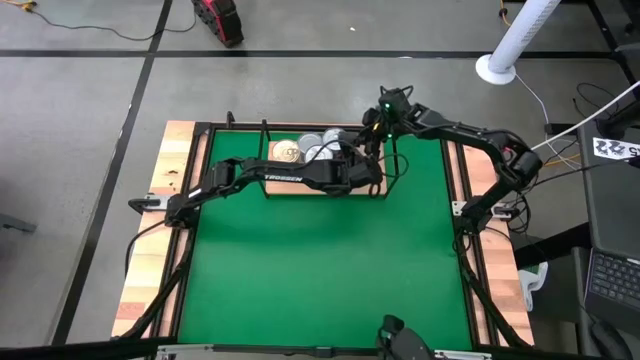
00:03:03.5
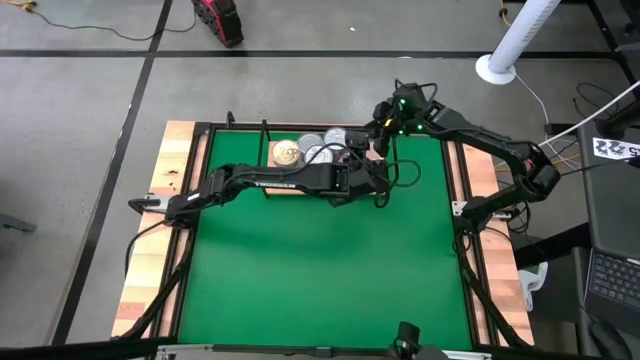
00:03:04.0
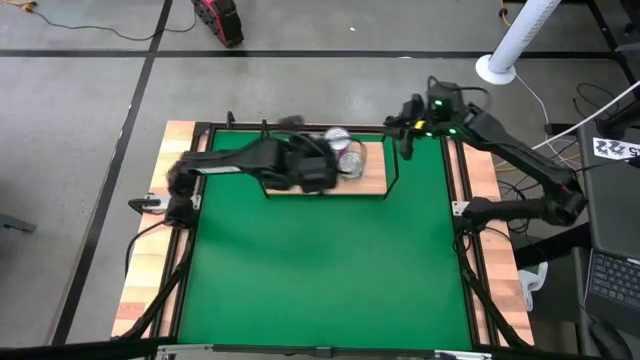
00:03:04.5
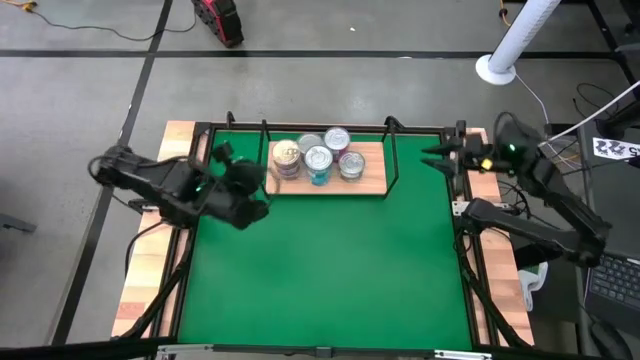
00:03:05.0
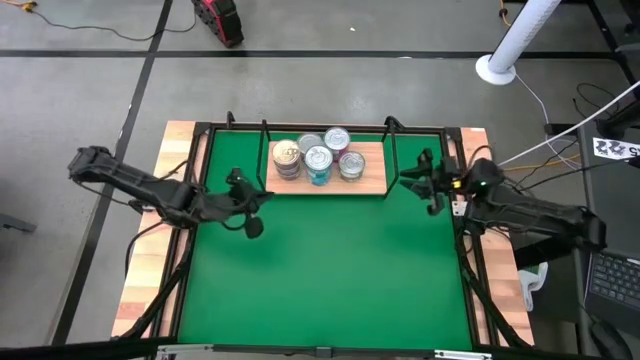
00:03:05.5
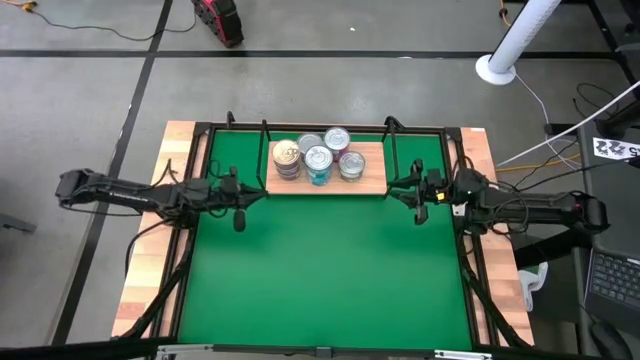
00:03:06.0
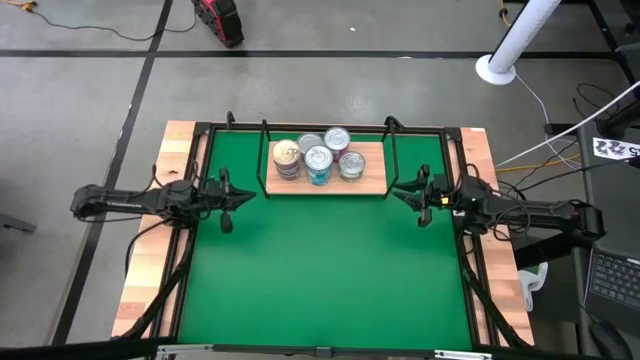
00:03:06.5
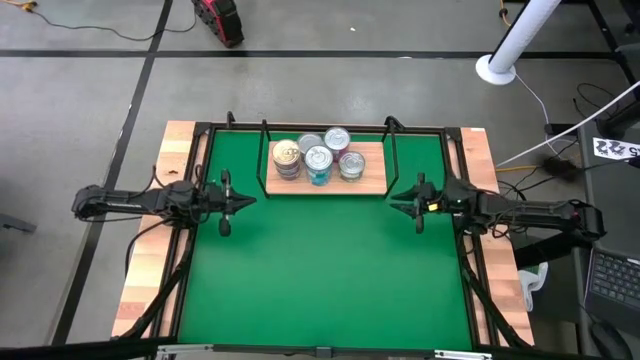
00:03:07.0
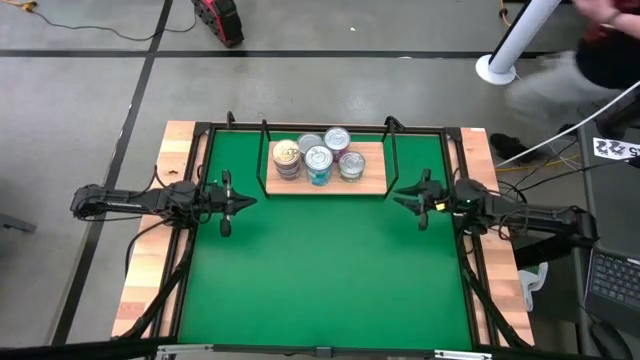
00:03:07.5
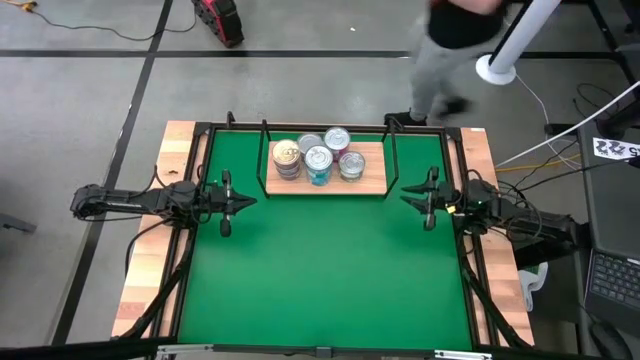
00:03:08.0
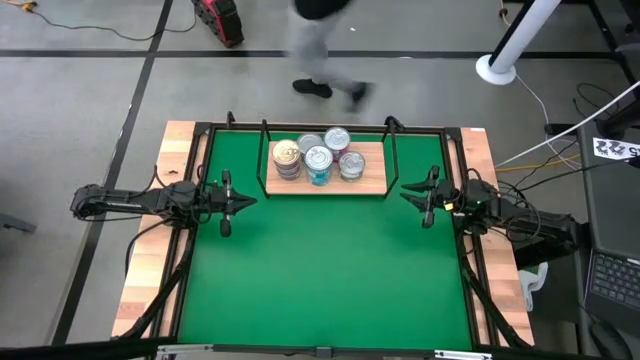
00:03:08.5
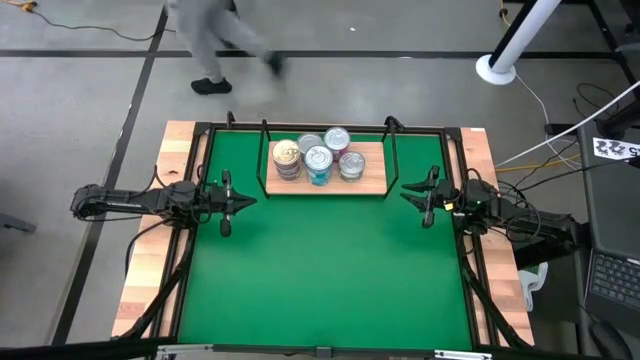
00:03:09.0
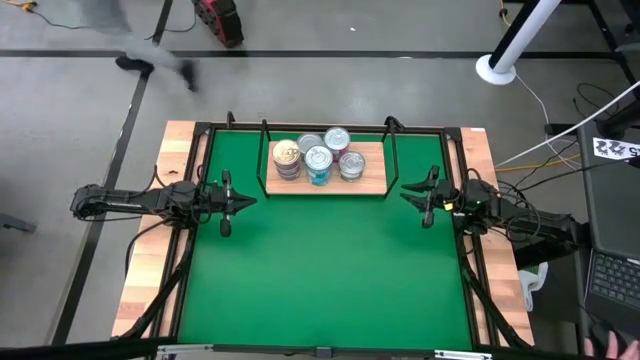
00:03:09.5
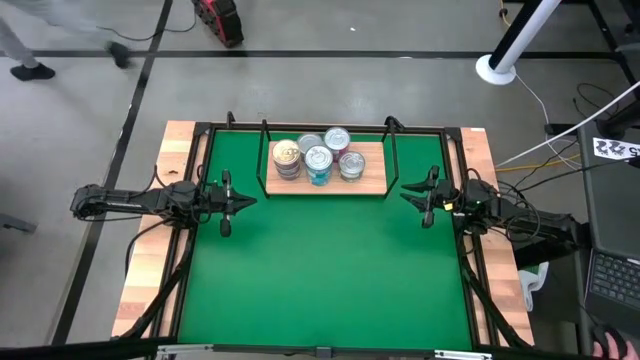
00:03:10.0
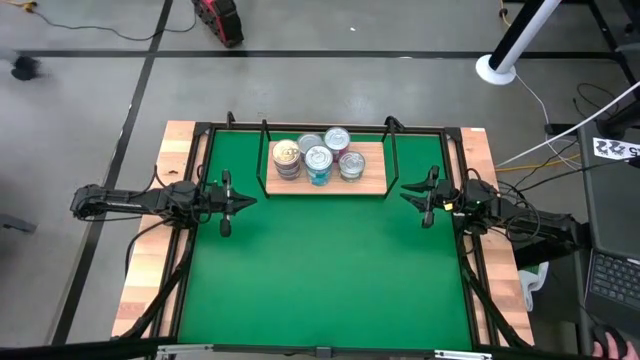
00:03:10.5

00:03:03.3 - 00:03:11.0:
Task: Stack canned seafood by type on shelf
Return to Home Position

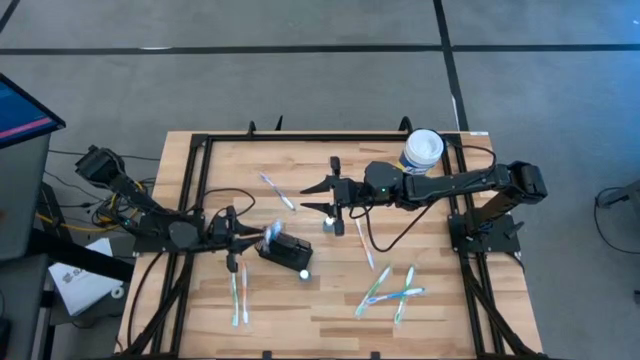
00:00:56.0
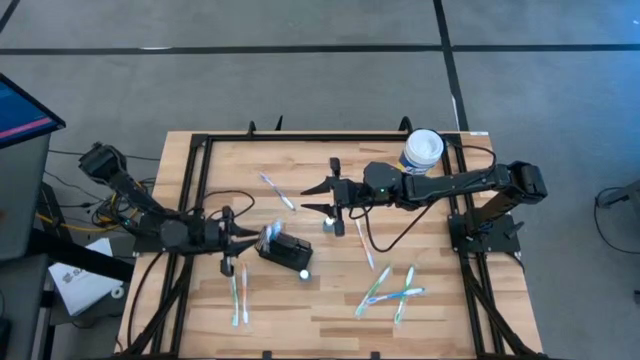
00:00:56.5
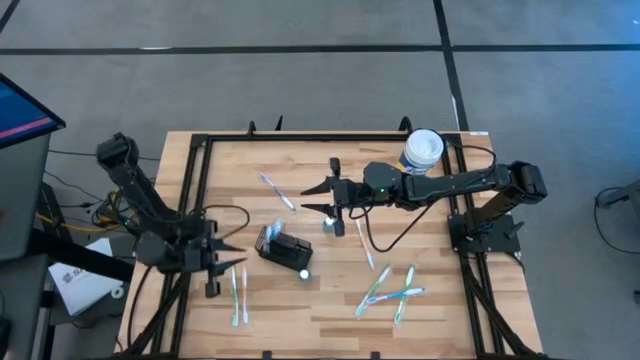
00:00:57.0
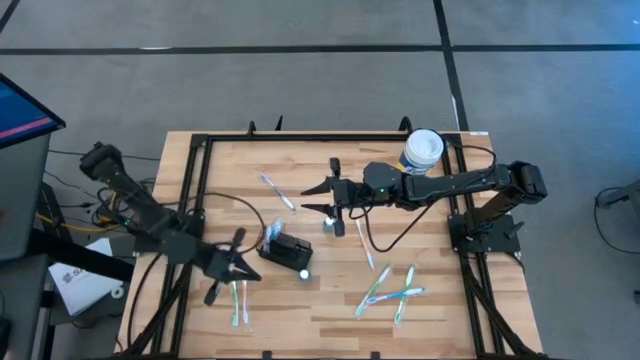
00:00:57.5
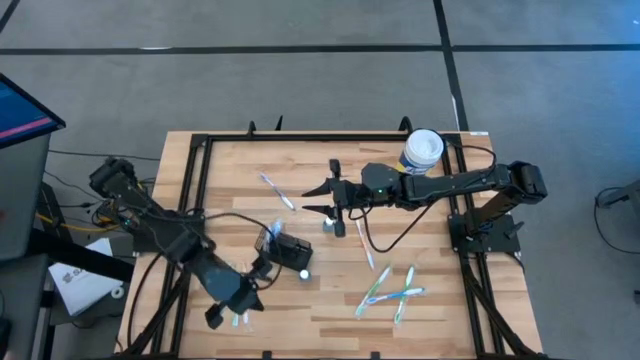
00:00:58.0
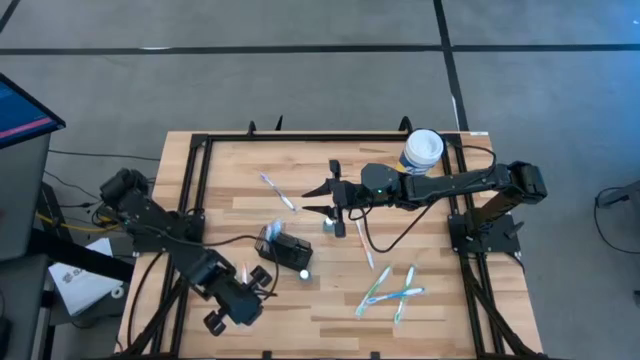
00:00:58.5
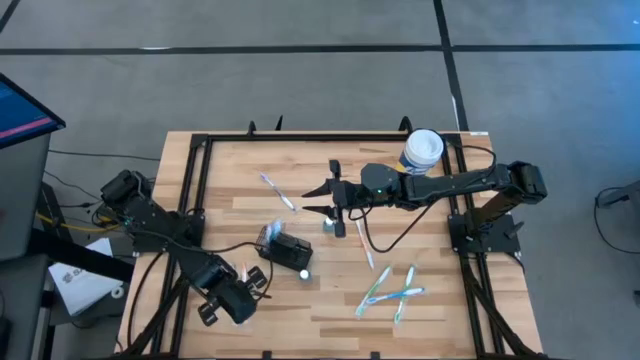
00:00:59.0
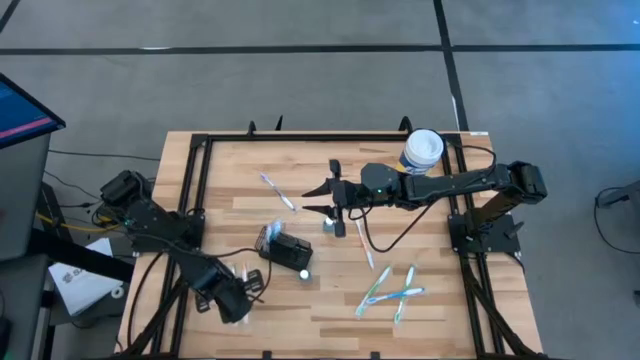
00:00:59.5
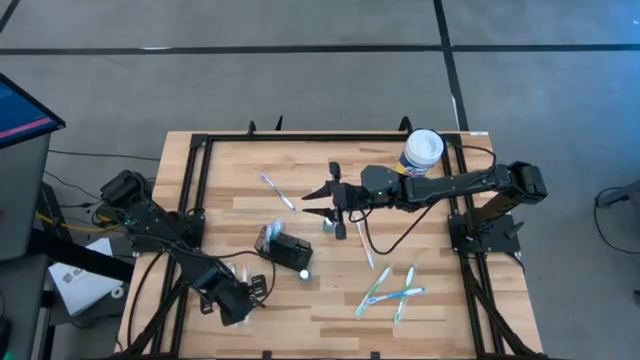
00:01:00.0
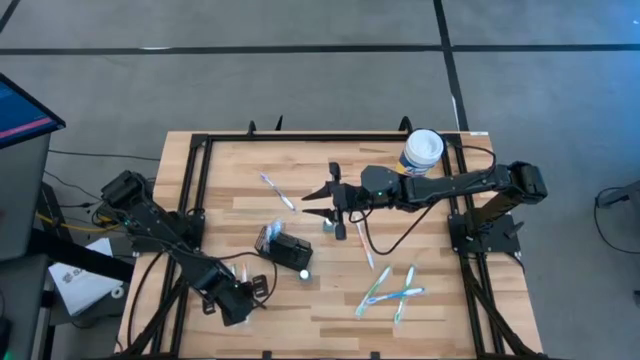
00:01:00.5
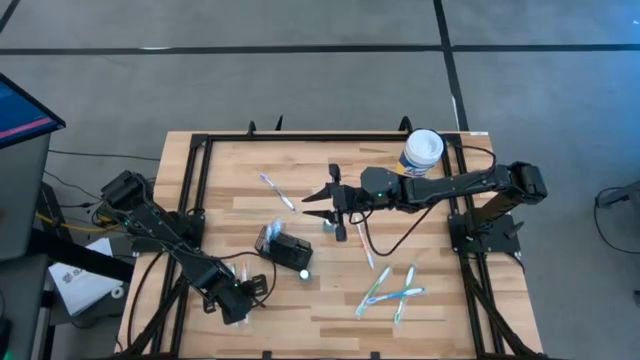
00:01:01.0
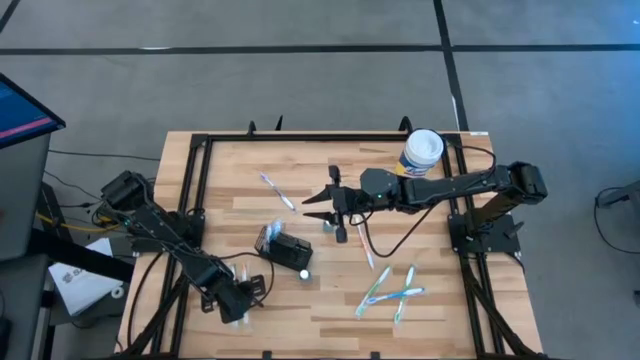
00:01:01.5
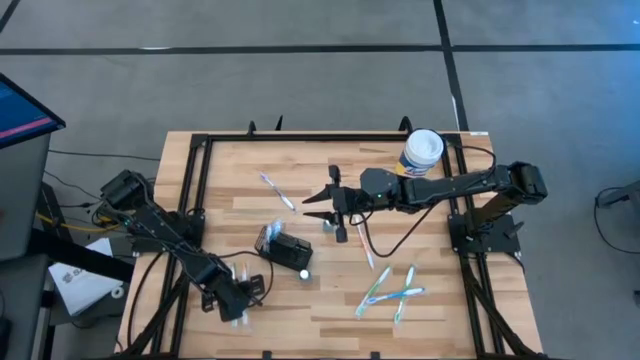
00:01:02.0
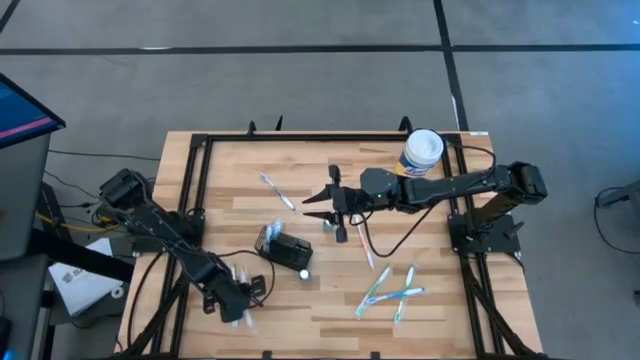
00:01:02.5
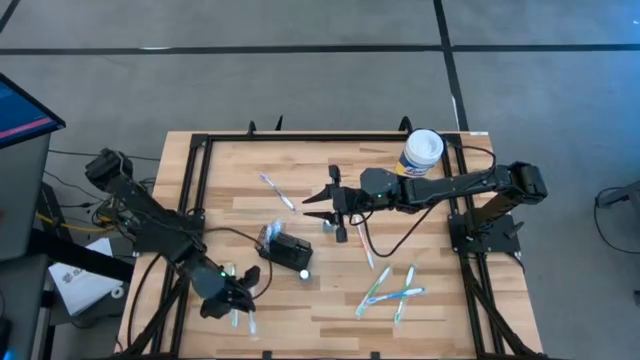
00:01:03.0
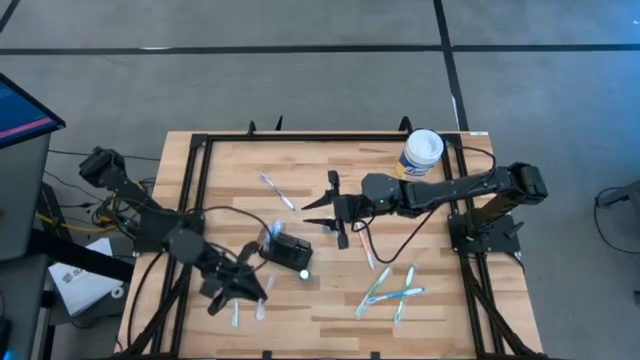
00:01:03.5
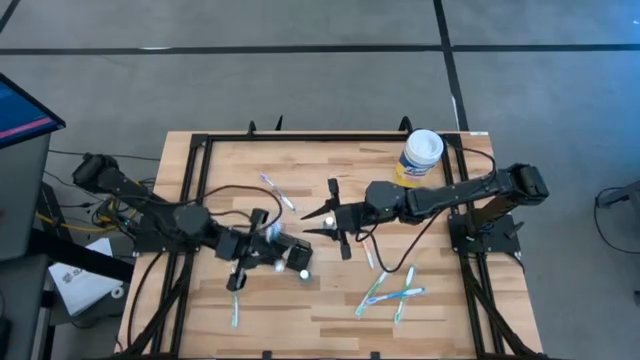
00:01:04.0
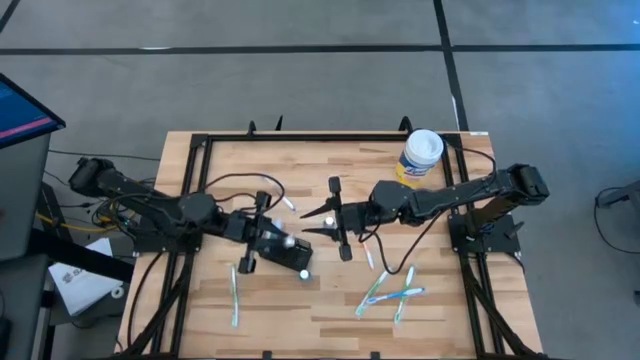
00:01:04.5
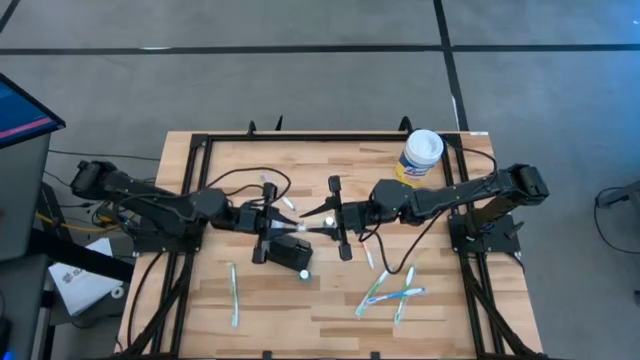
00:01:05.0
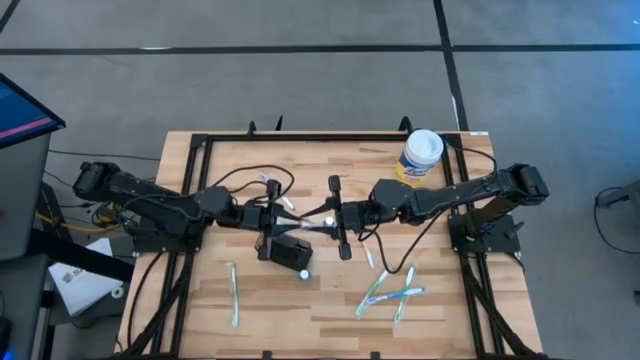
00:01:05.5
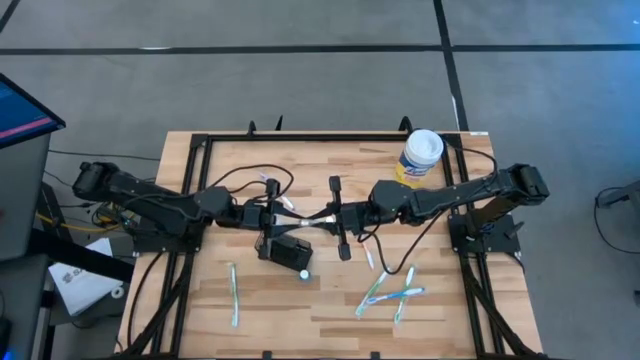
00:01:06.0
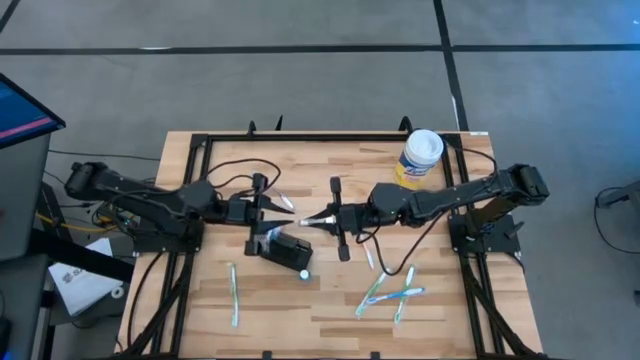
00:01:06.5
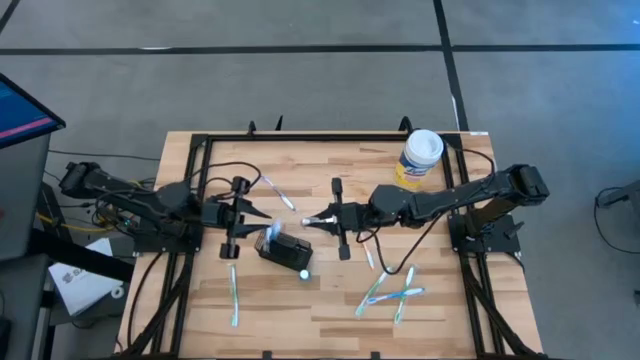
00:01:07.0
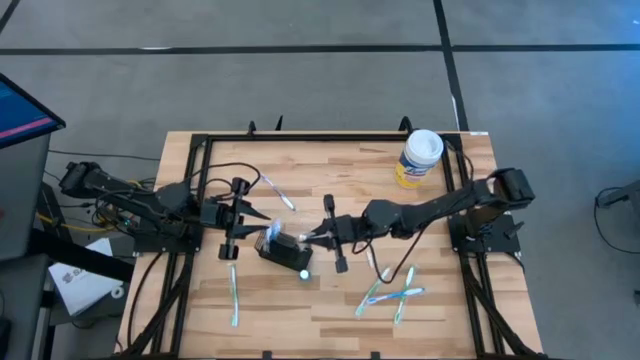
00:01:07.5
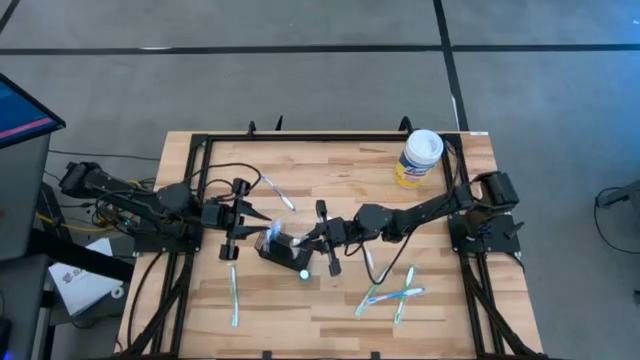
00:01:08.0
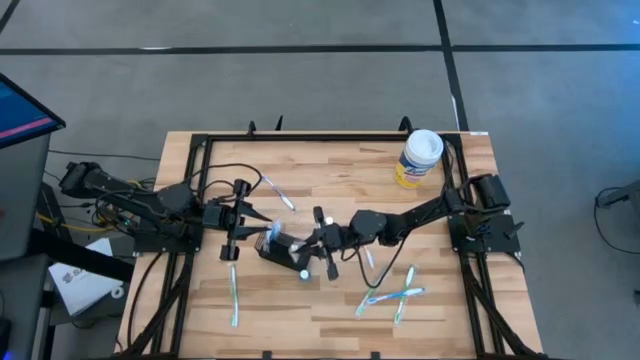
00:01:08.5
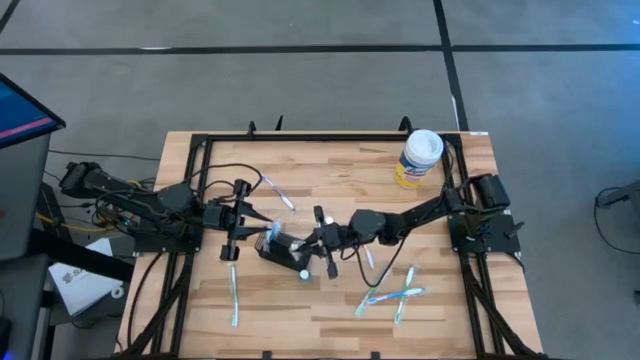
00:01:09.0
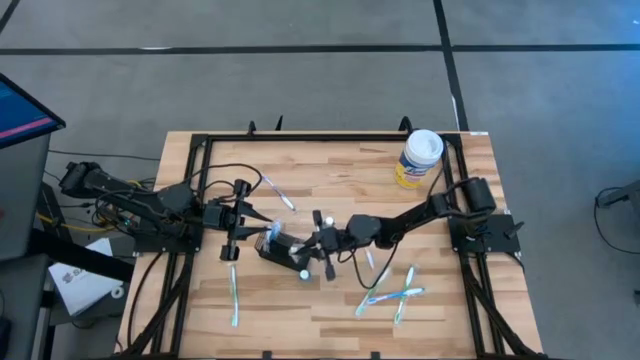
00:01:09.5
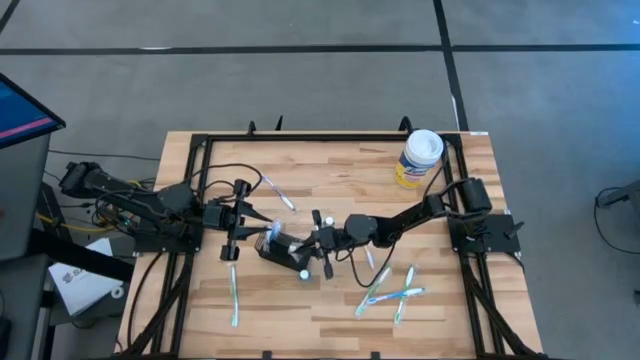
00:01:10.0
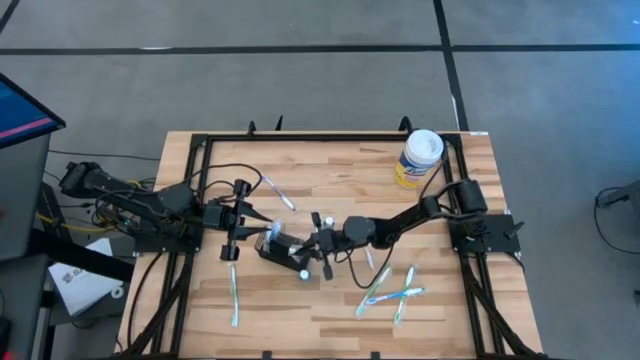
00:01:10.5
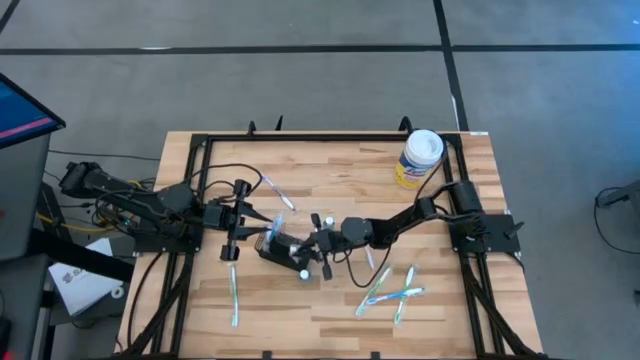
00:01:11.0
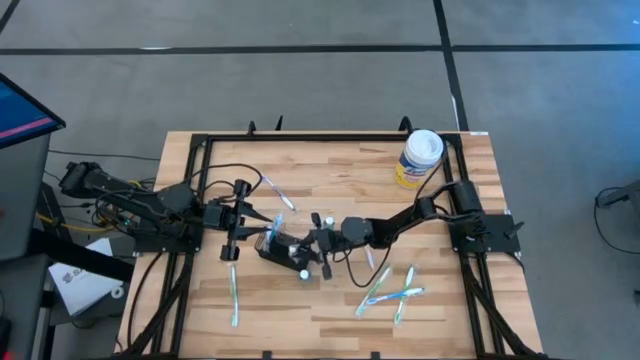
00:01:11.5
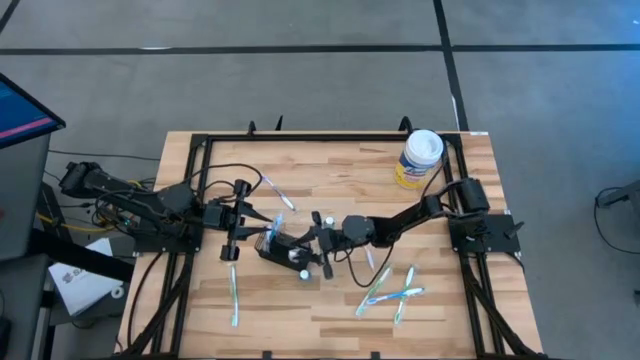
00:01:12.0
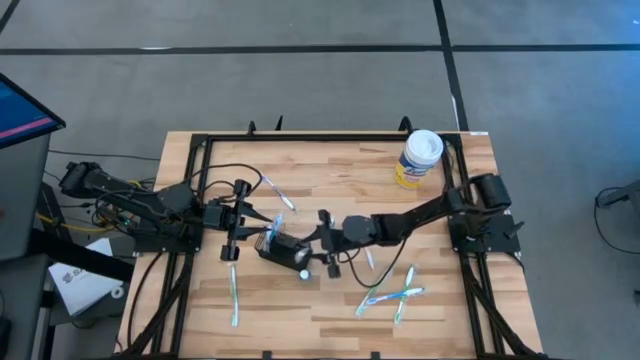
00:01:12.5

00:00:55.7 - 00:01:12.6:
Task: Pick & Place toothbrushing station
Put the left orange toothbrush into the right compartment of the wire organizer
